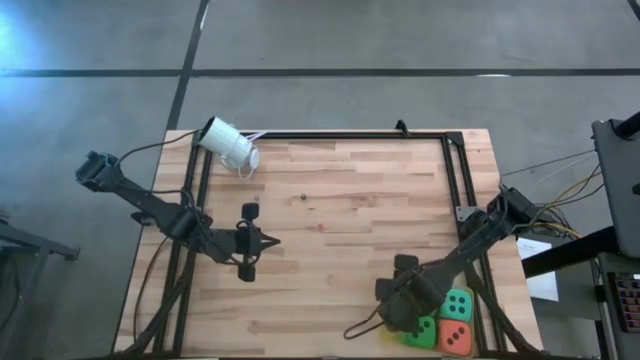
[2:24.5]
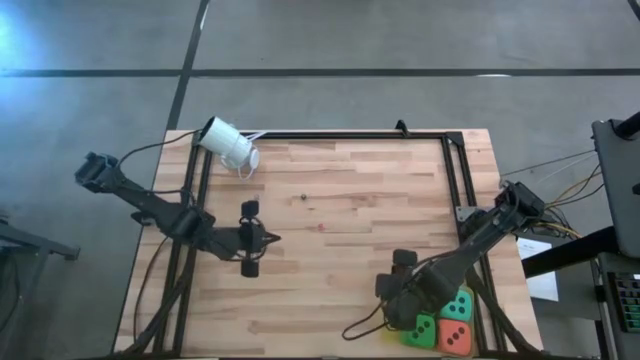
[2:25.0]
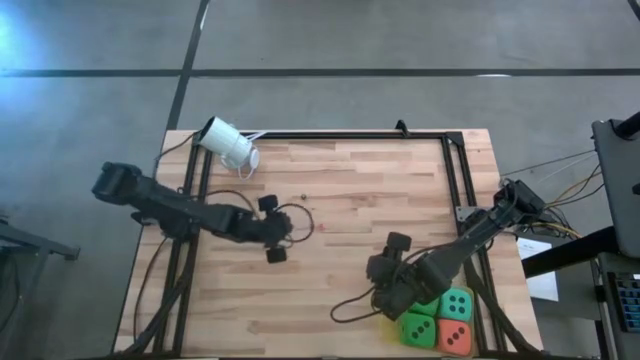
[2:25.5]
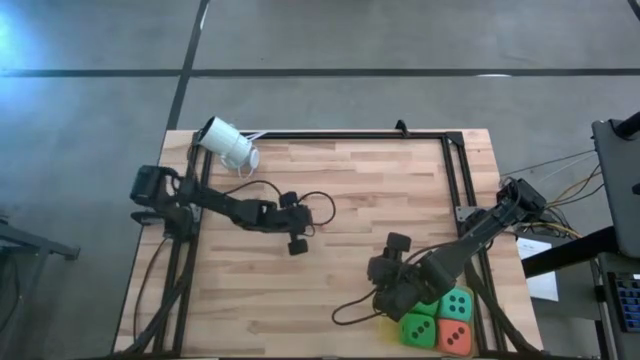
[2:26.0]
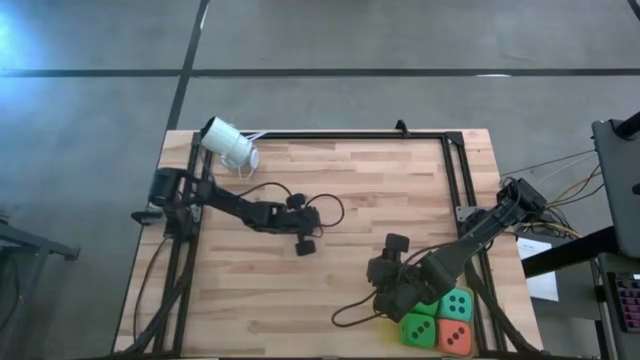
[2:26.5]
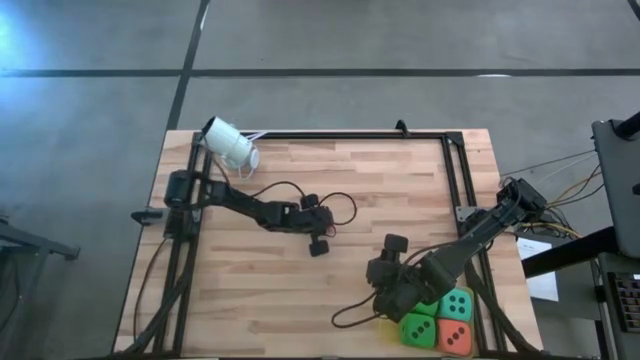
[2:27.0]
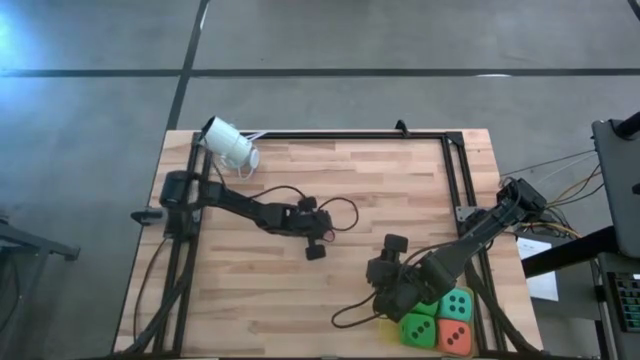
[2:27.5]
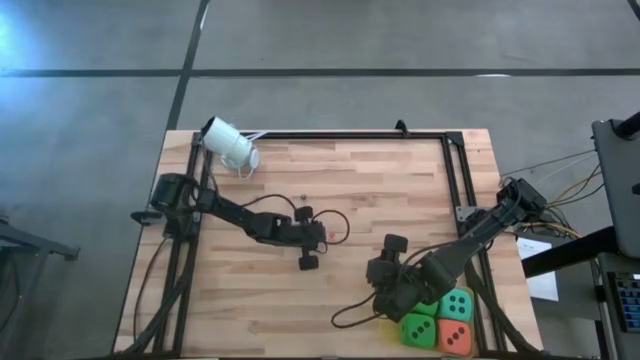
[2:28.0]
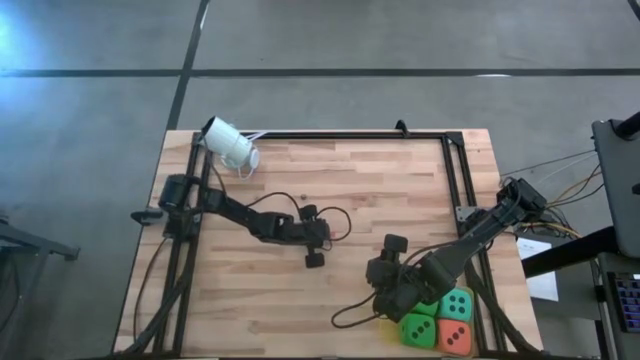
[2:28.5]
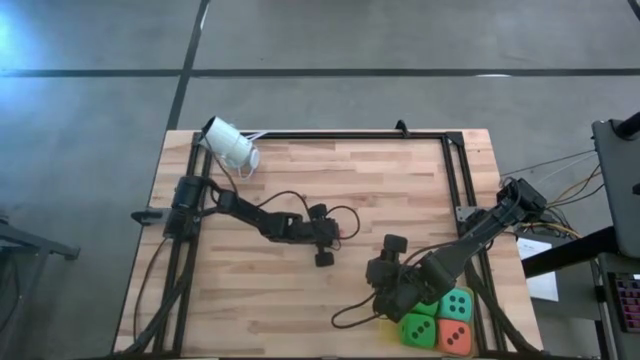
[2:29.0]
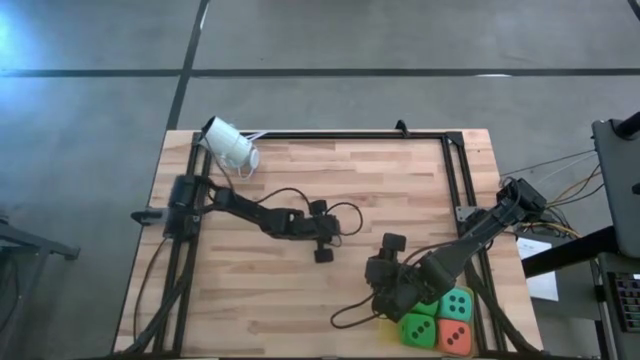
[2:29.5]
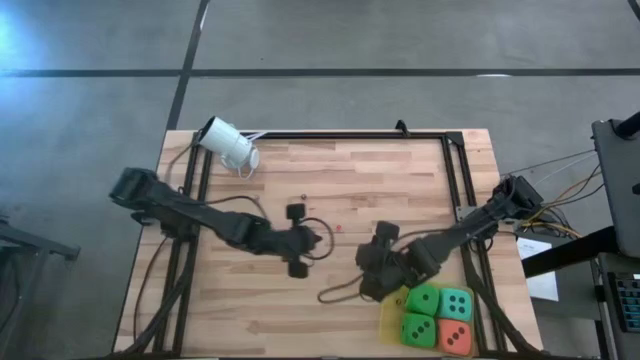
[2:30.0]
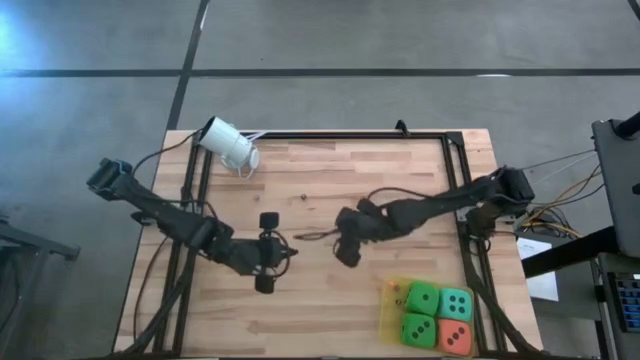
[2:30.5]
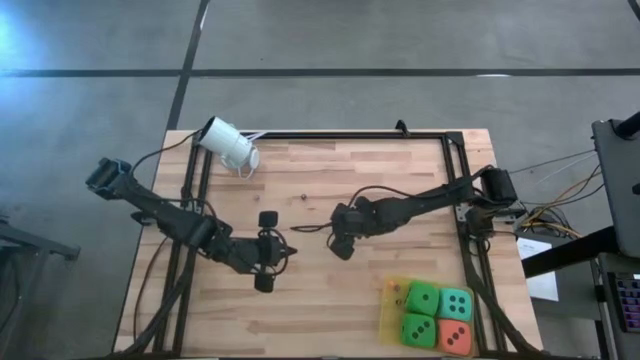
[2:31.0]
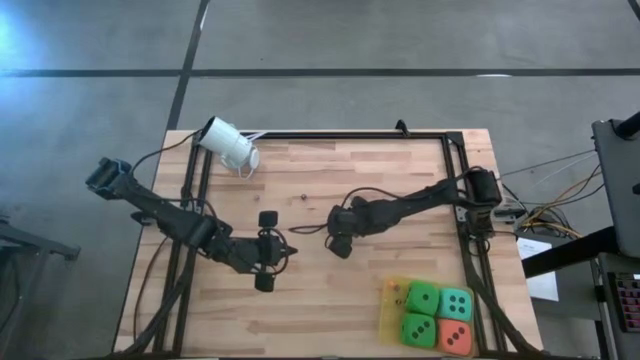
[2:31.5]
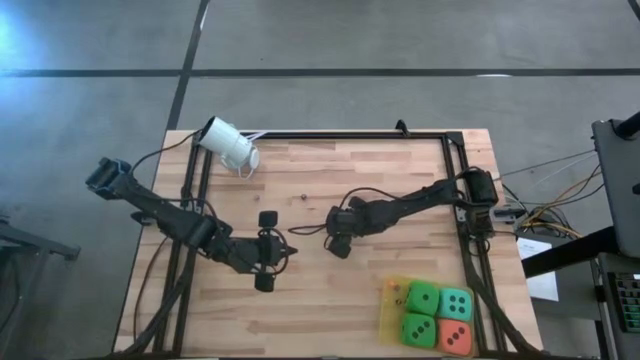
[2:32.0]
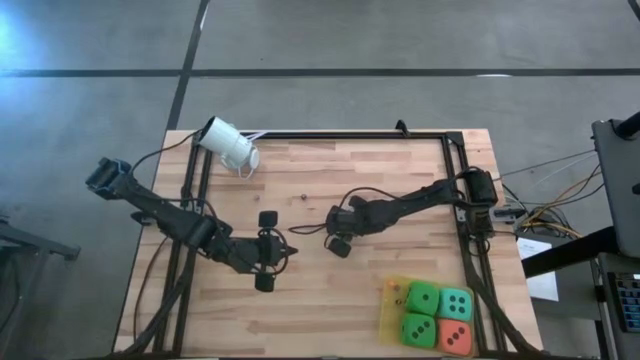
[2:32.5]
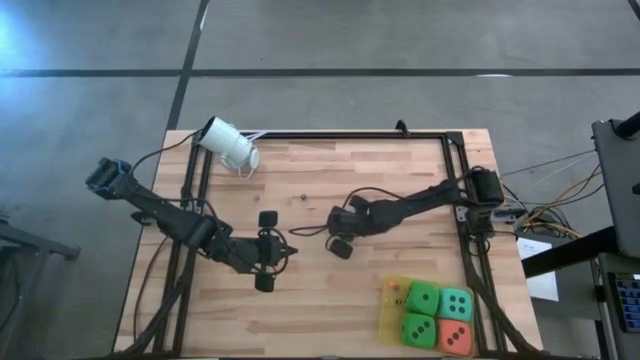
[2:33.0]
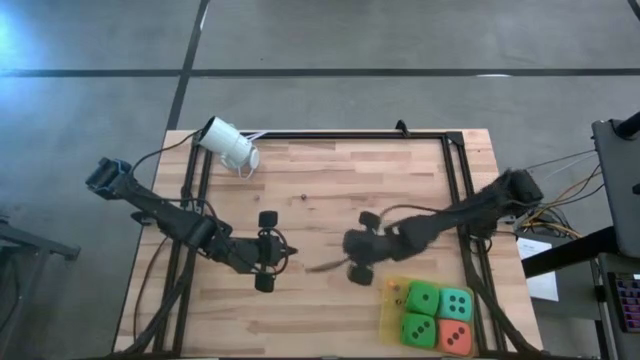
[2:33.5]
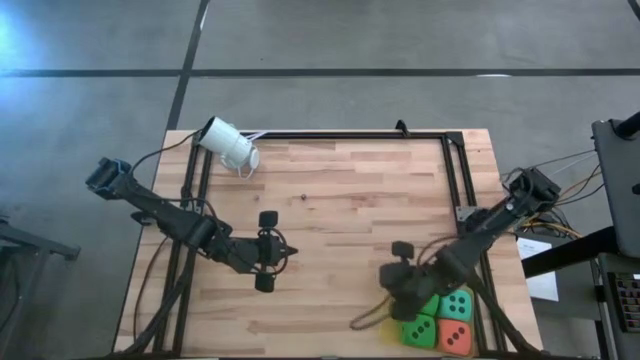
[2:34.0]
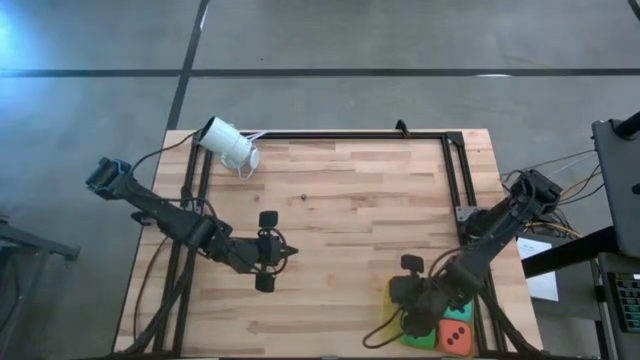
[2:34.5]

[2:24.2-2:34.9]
Task: Pick & Place Dice
Put the small pink die into the yellow bin

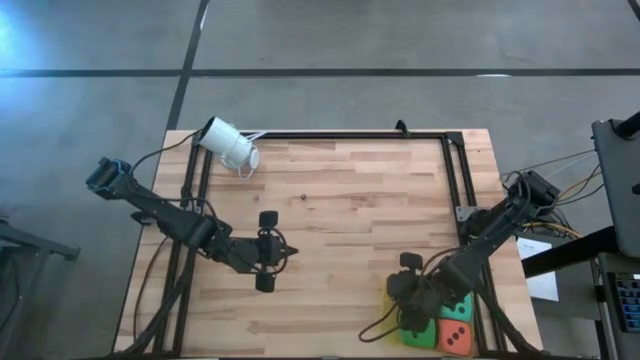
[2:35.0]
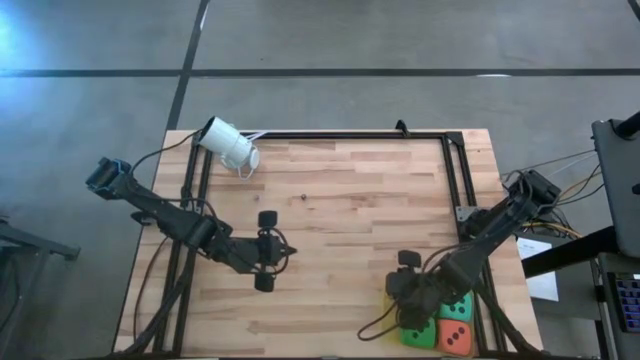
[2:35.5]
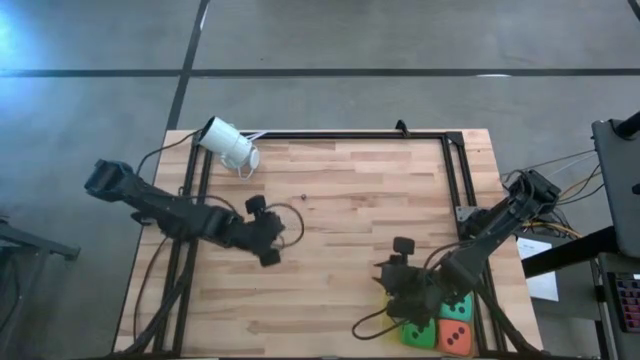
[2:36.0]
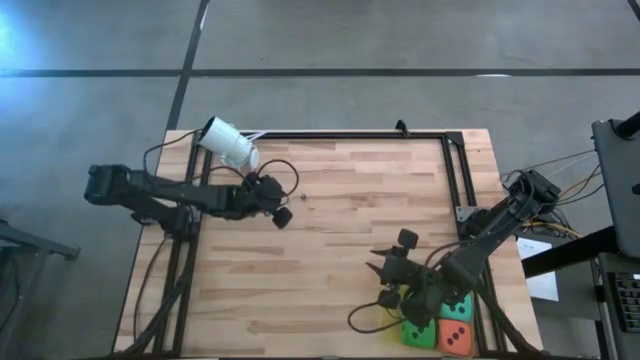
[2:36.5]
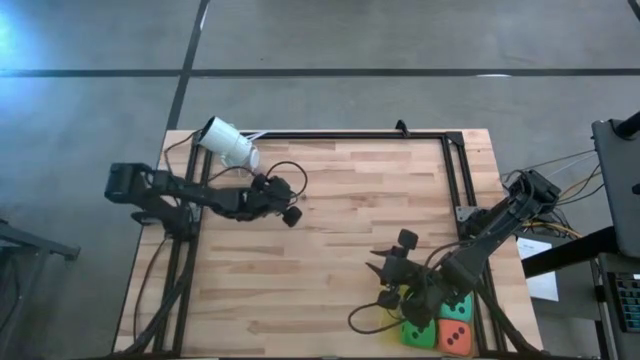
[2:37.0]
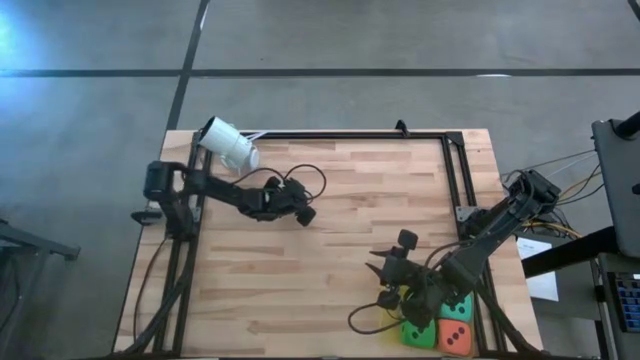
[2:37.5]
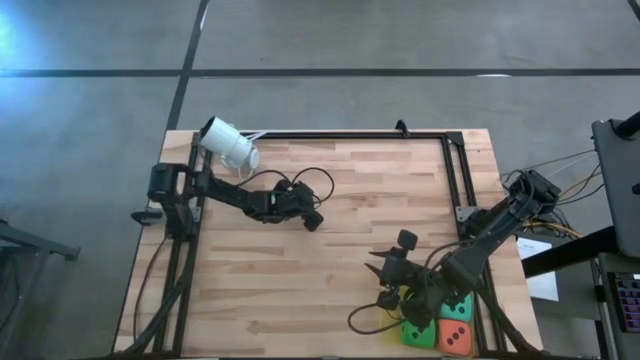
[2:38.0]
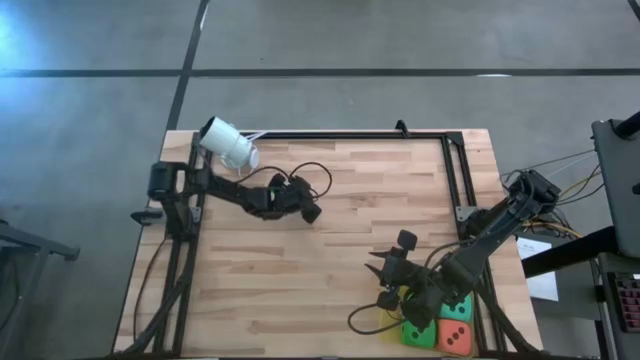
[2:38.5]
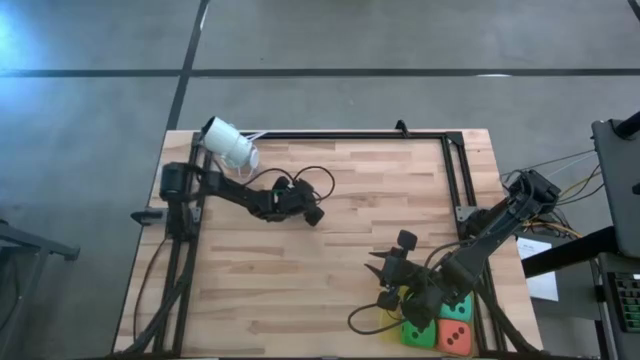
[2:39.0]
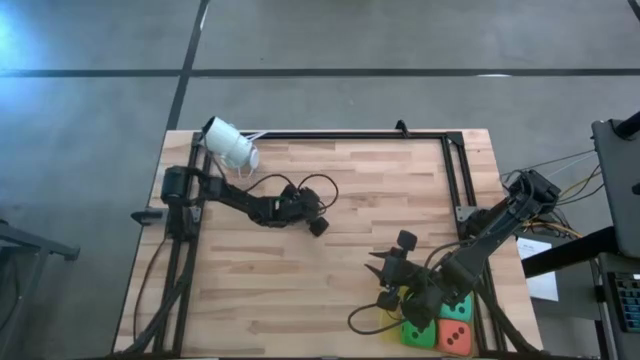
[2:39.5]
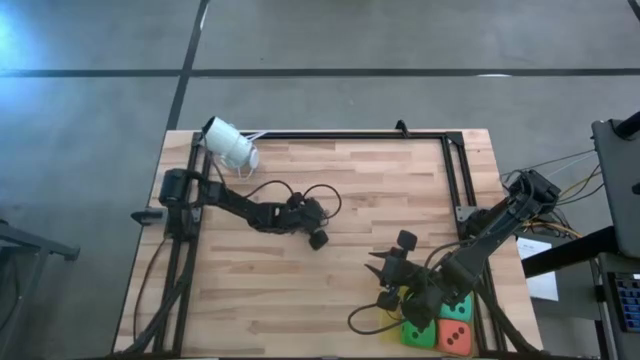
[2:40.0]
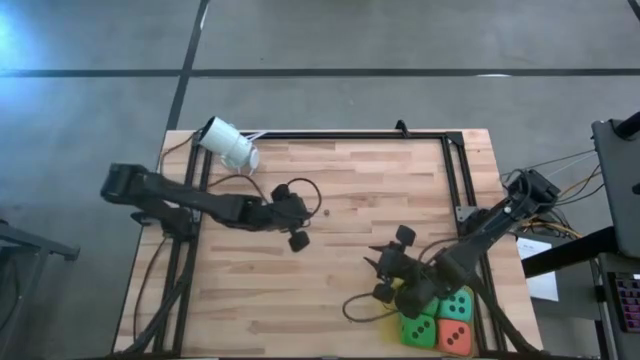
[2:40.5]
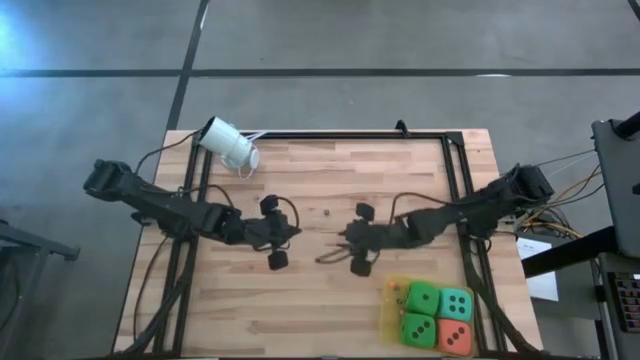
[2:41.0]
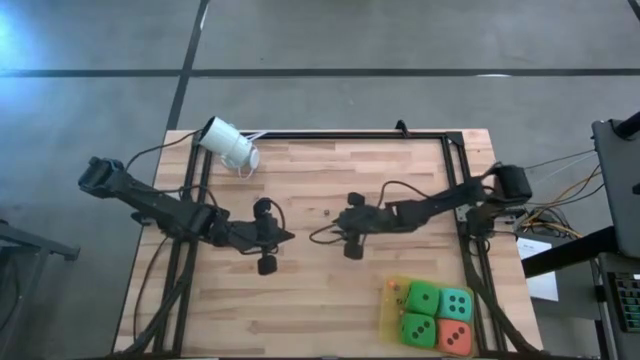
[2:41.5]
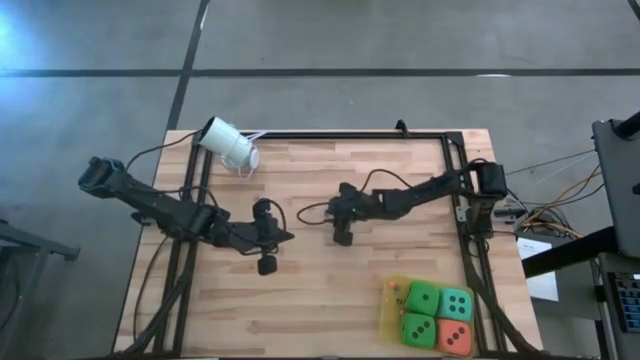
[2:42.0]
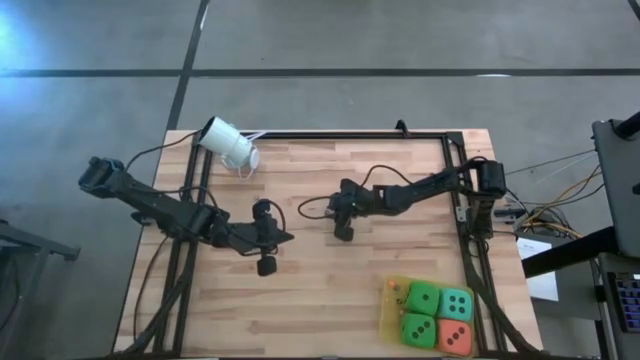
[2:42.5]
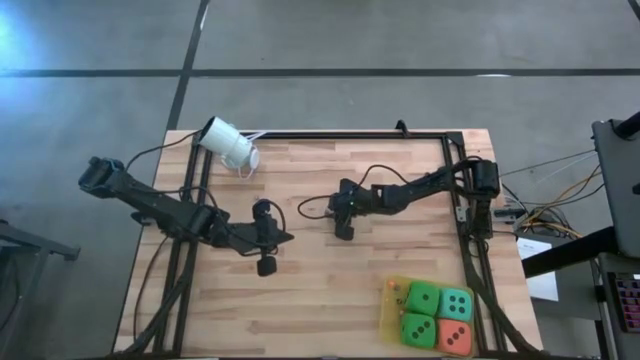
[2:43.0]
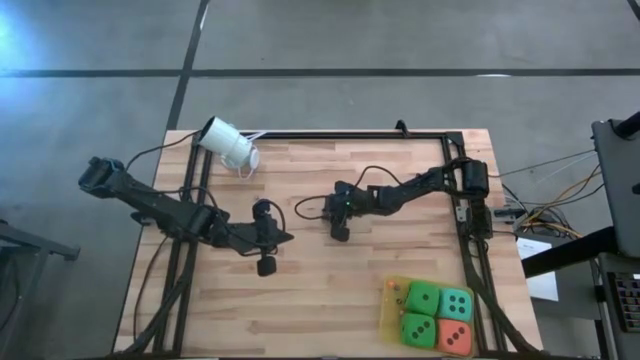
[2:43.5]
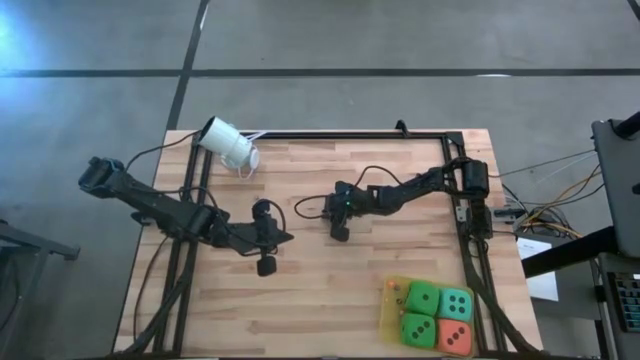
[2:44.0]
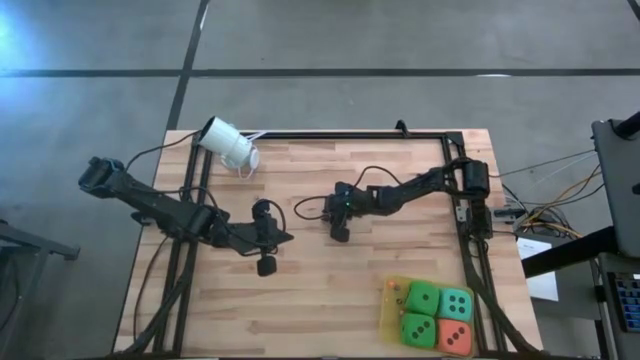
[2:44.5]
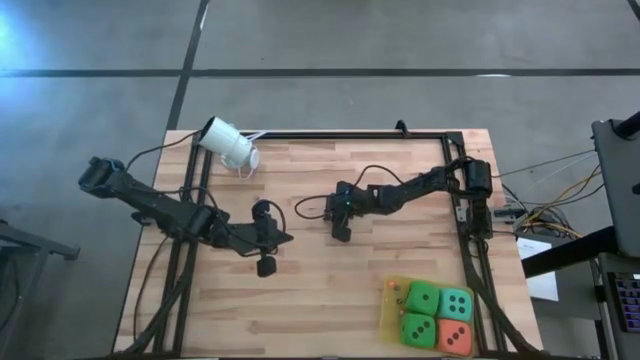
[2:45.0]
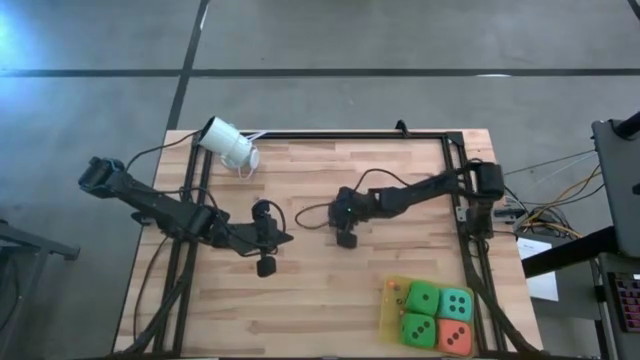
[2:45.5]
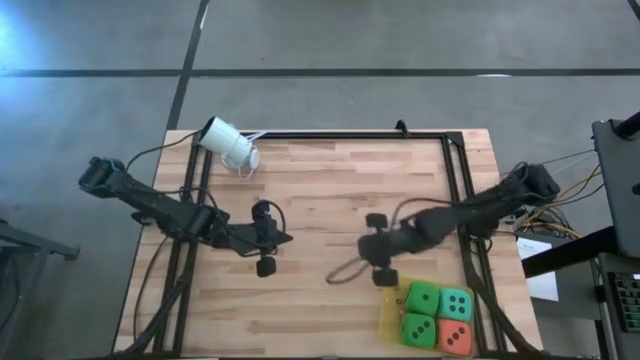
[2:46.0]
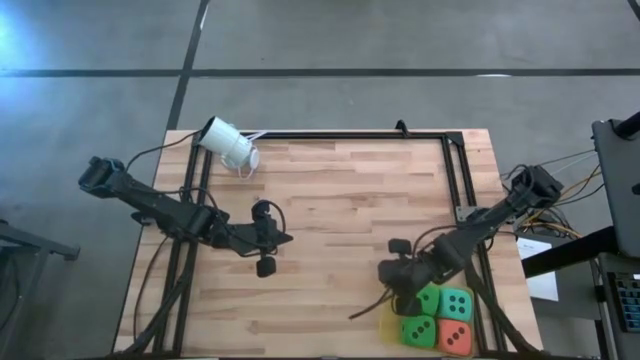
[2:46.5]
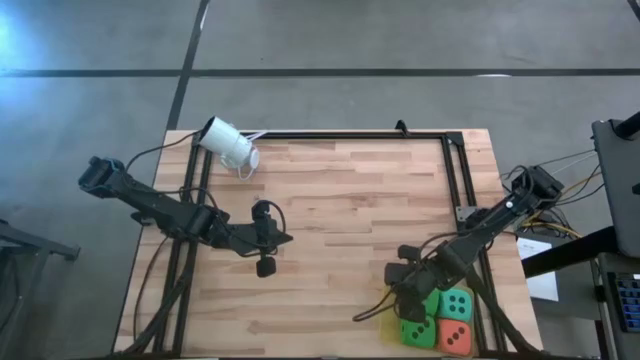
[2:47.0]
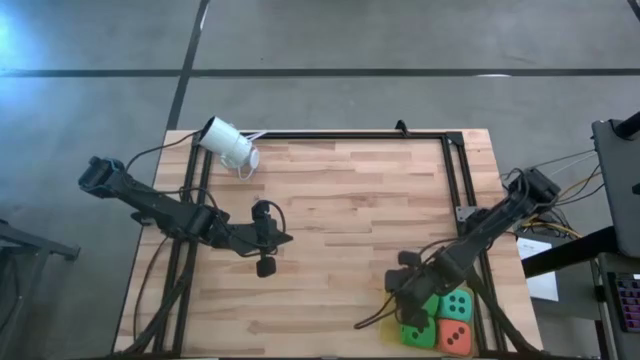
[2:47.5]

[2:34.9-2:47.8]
Put the small black die into the yellow bin
